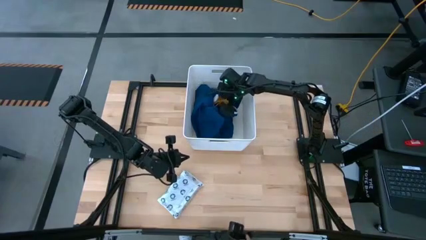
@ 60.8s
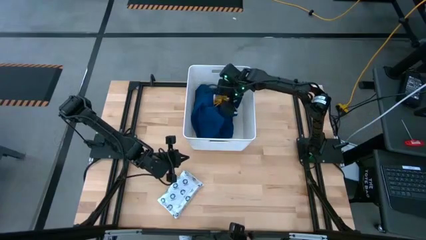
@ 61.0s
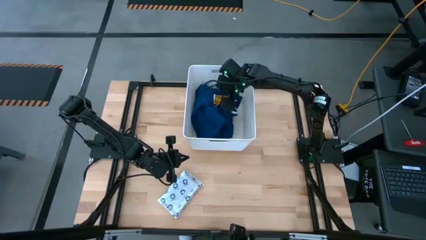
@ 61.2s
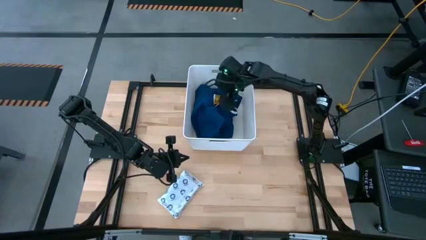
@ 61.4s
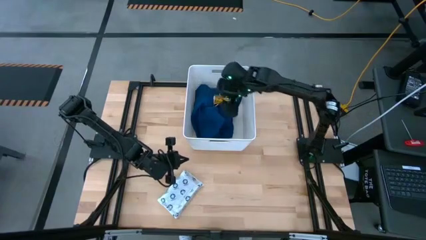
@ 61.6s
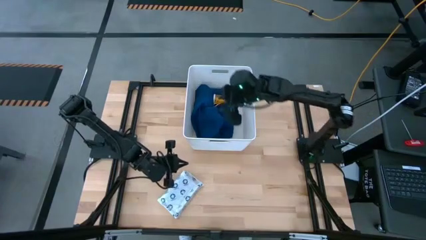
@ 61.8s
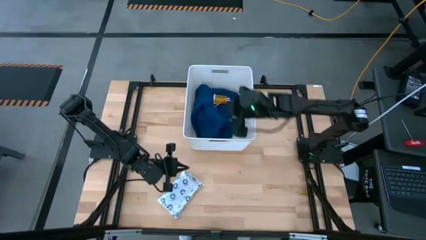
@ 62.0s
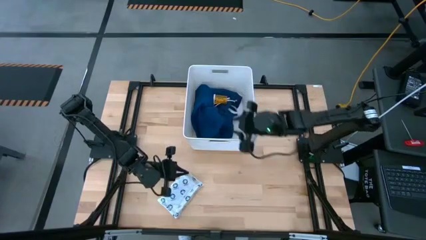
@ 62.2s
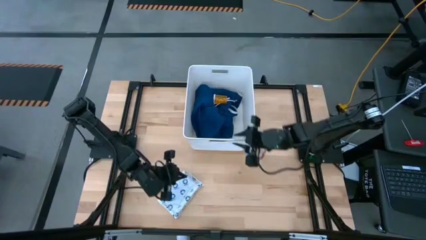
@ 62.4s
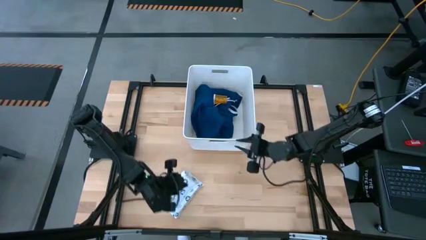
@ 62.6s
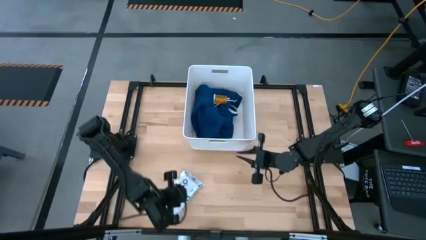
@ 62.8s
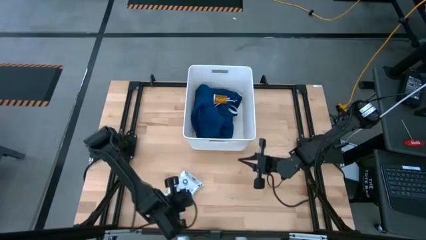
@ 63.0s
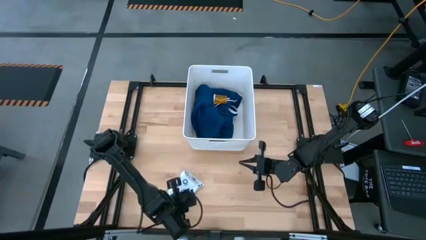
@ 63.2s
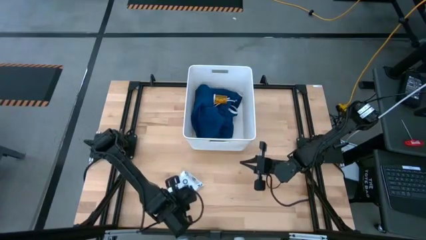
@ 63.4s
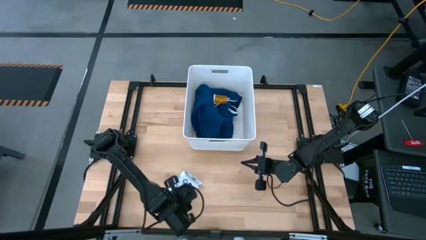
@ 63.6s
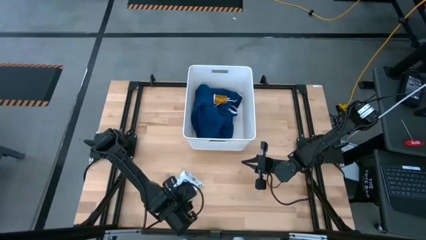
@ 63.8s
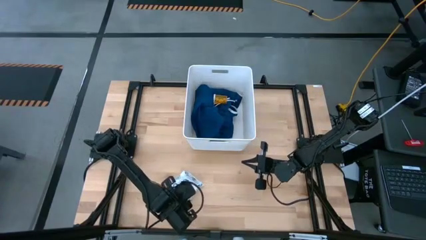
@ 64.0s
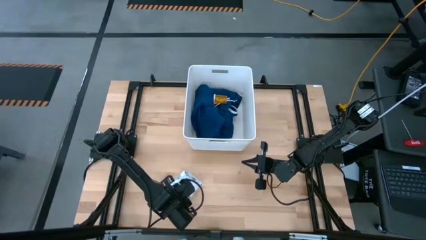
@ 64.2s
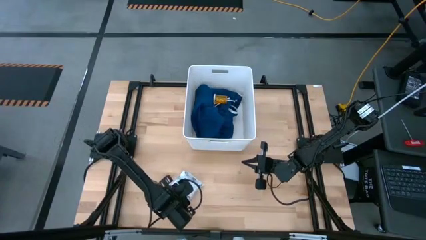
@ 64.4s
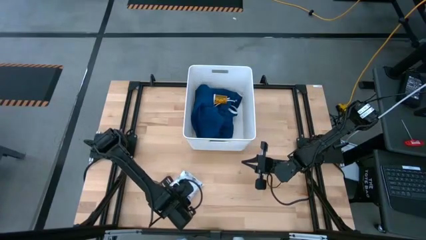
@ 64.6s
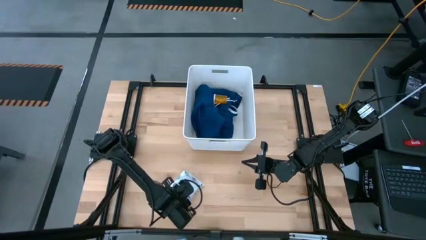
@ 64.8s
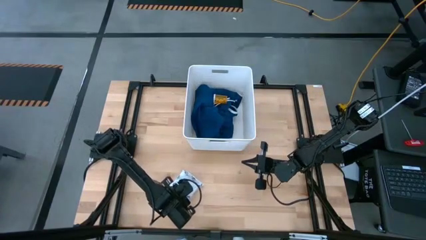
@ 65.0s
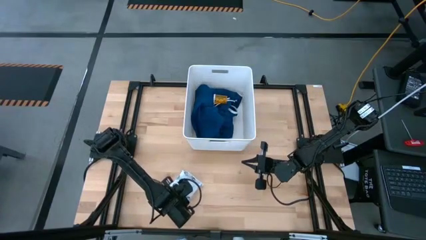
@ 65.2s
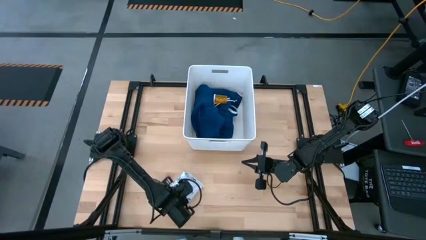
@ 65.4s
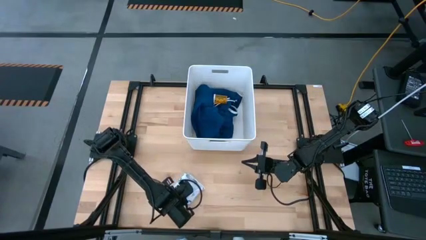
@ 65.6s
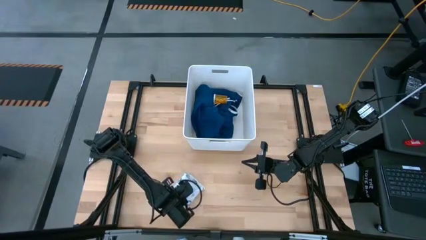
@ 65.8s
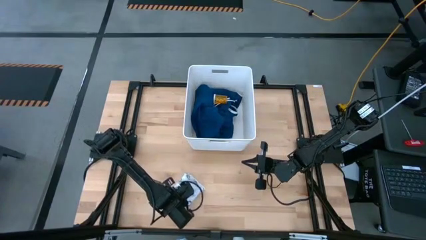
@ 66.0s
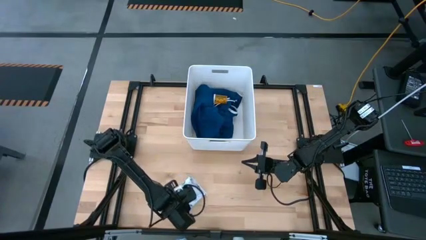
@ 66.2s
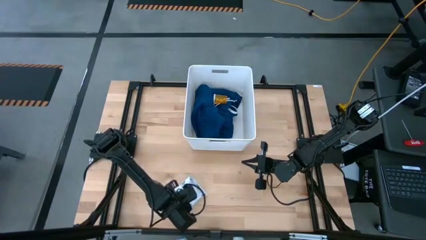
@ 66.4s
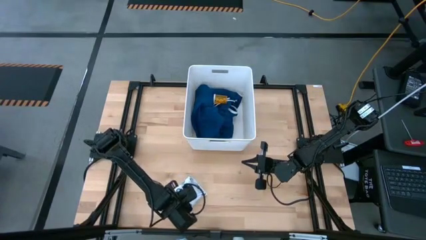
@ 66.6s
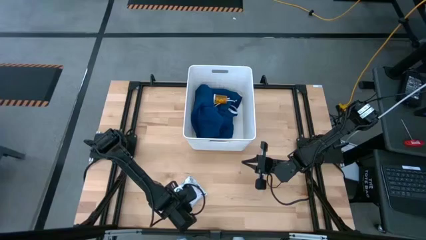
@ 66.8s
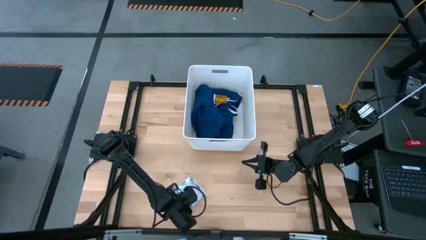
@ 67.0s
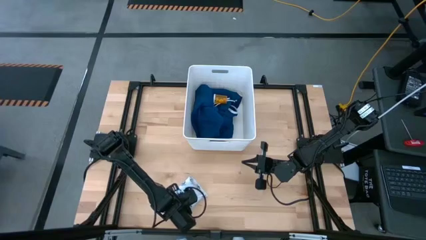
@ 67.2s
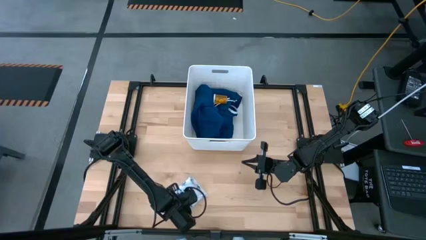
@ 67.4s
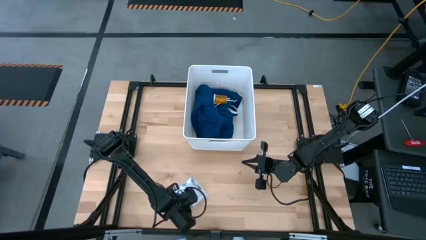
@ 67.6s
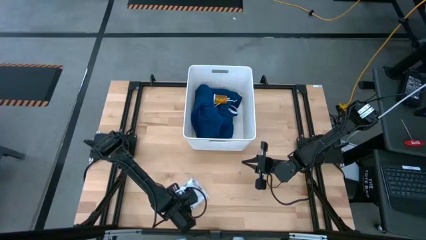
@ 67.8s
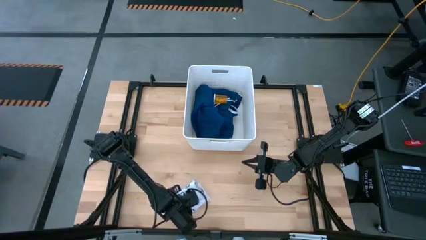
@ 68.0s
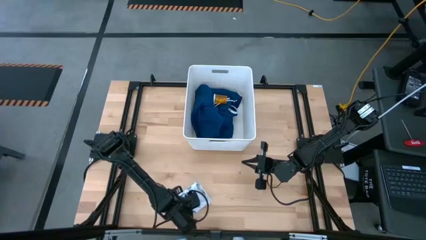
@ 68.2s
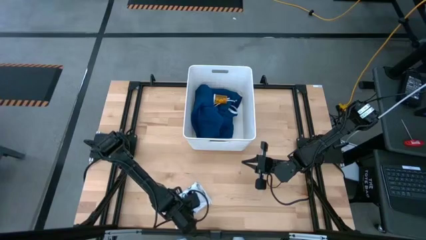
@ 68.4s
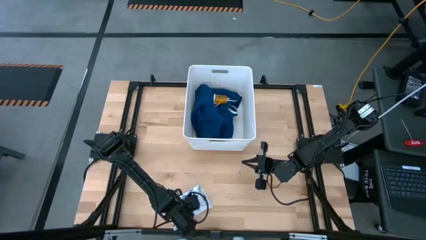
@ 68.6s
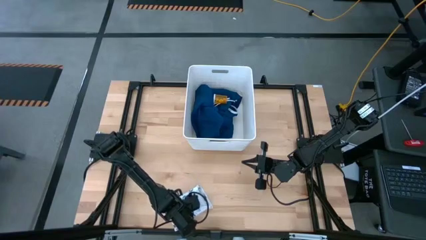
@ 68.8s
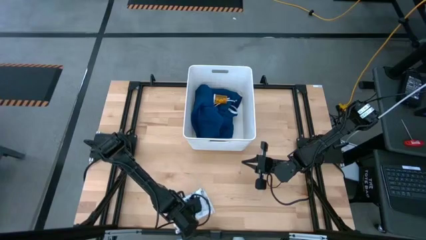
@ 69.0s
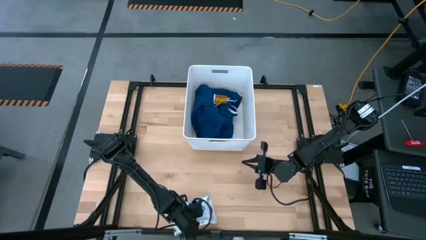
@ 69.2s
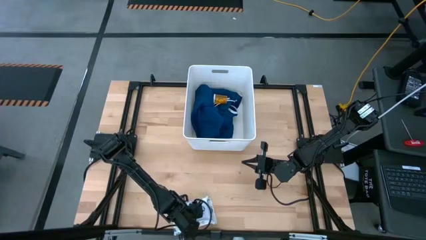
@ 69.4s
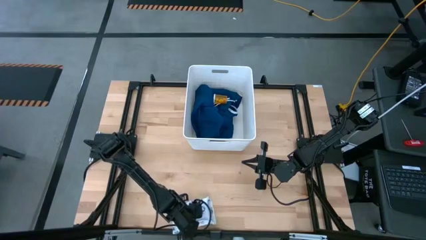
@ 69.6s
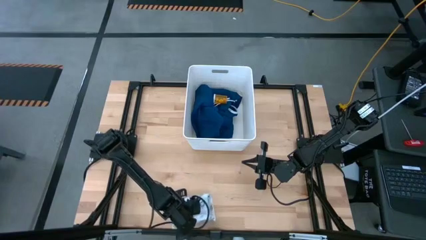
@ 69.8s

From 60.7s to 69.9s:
Task: Pick & place medical supplies in basket/bin
Put the white mailer bag into the white bin

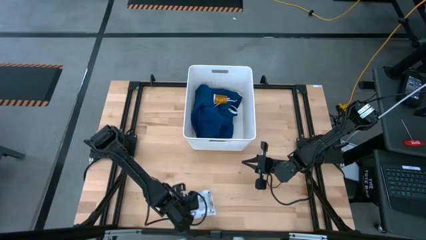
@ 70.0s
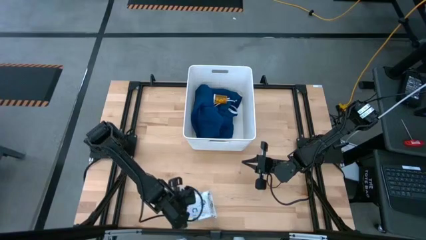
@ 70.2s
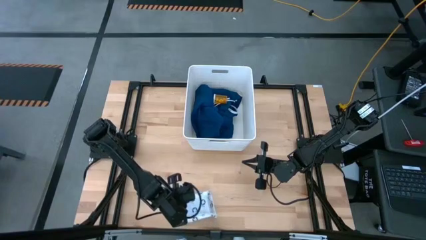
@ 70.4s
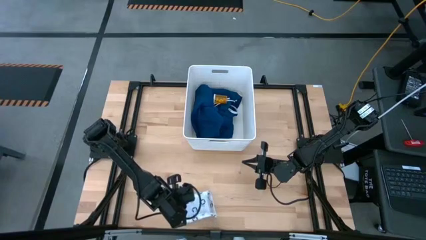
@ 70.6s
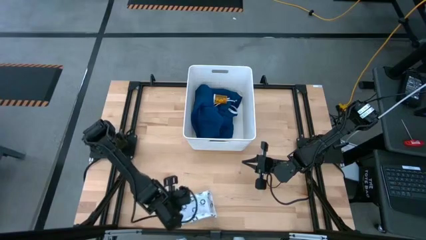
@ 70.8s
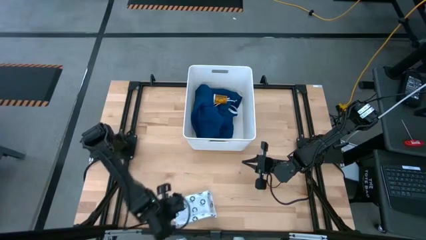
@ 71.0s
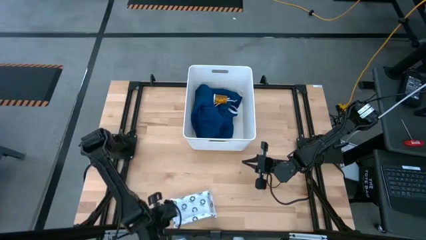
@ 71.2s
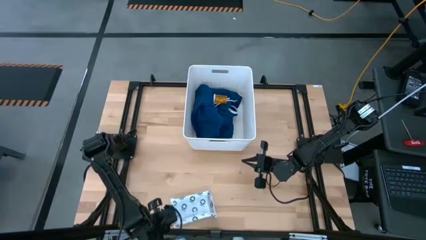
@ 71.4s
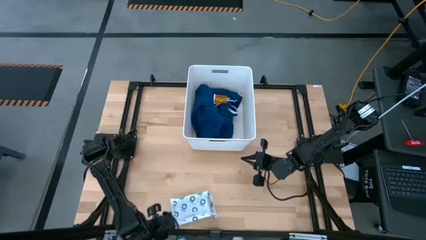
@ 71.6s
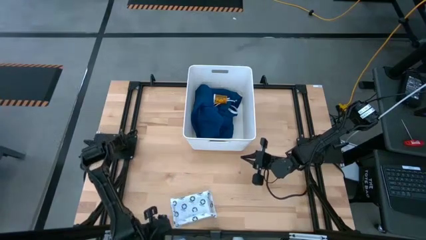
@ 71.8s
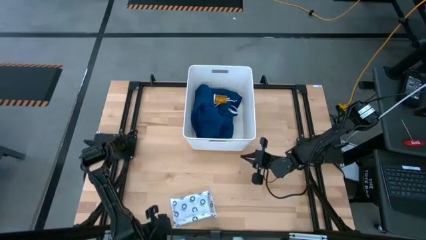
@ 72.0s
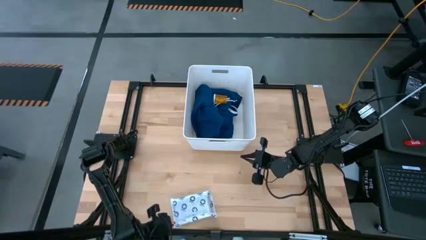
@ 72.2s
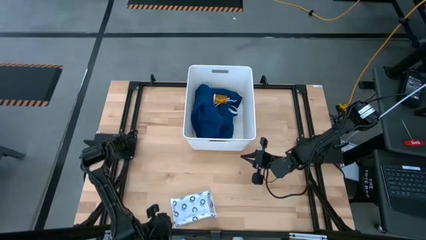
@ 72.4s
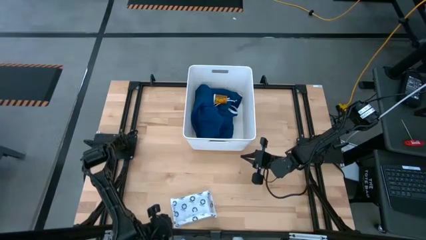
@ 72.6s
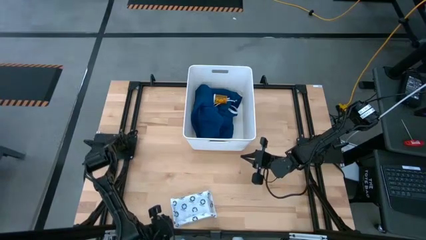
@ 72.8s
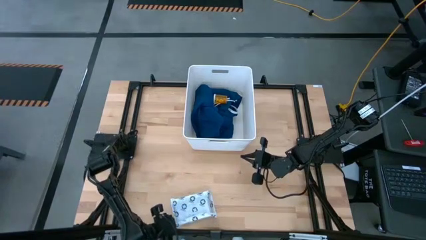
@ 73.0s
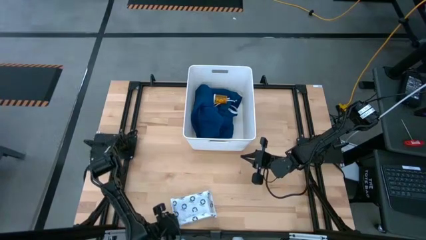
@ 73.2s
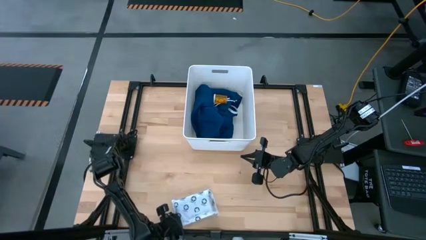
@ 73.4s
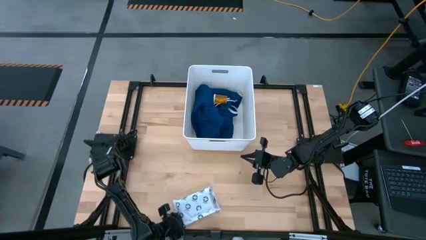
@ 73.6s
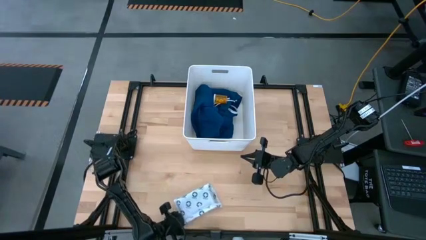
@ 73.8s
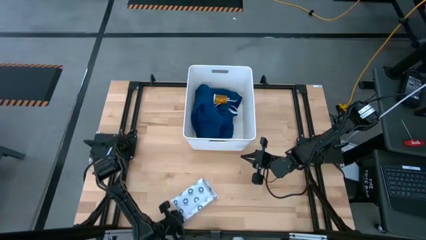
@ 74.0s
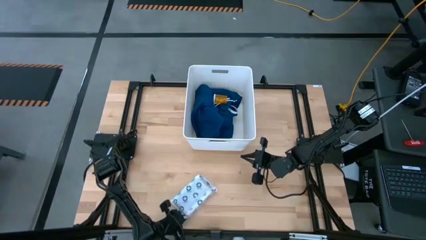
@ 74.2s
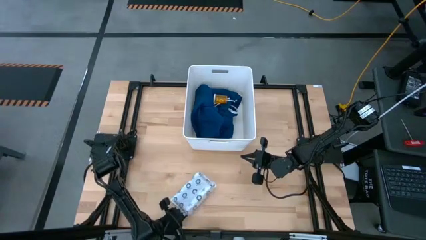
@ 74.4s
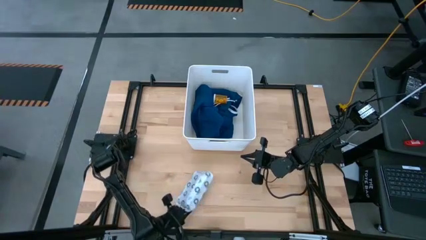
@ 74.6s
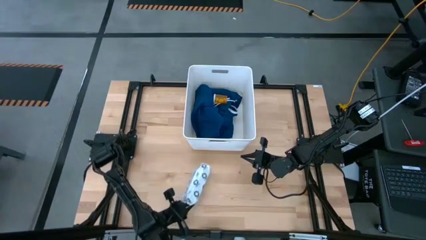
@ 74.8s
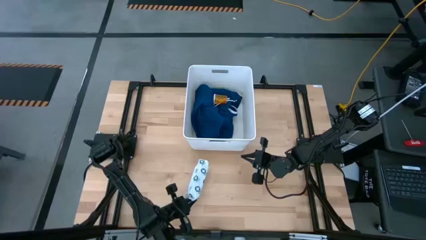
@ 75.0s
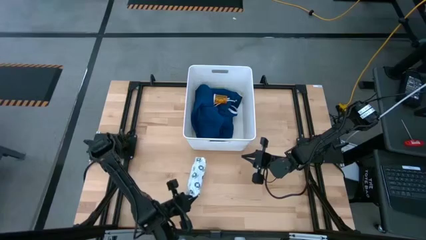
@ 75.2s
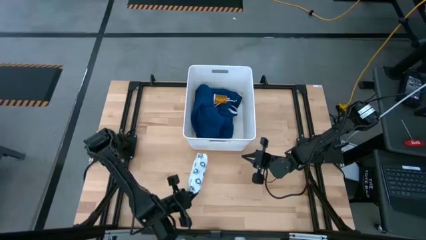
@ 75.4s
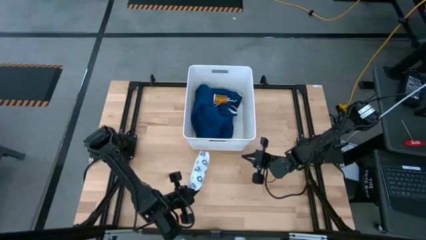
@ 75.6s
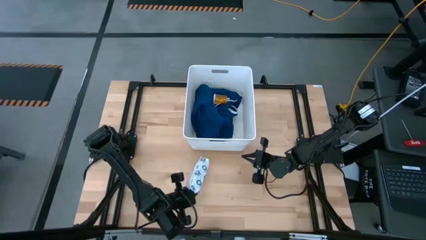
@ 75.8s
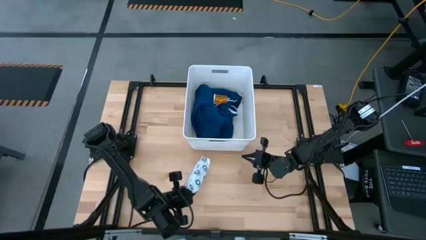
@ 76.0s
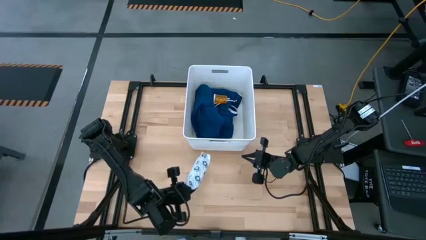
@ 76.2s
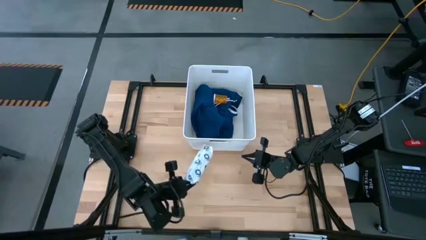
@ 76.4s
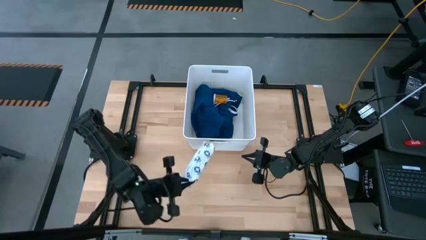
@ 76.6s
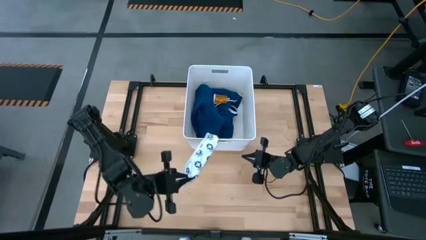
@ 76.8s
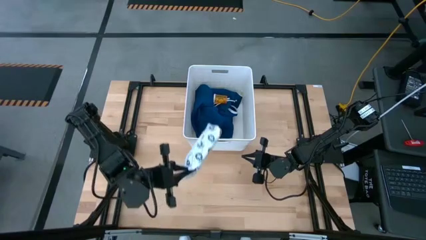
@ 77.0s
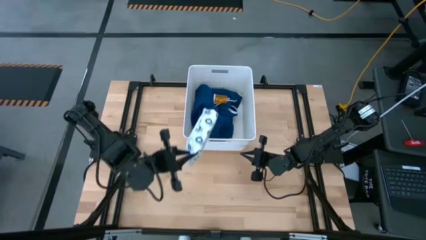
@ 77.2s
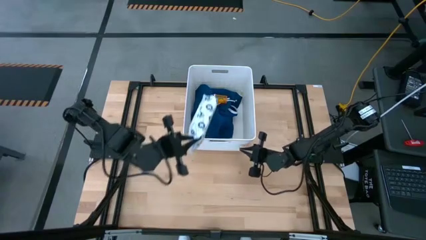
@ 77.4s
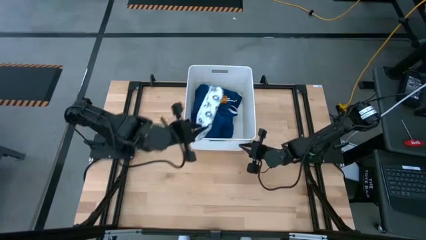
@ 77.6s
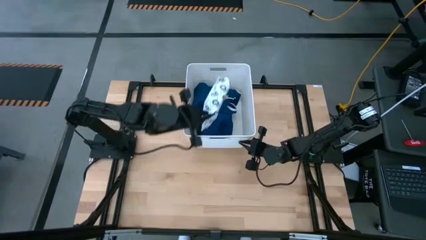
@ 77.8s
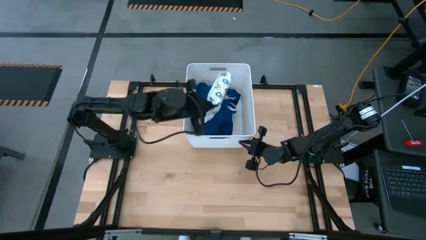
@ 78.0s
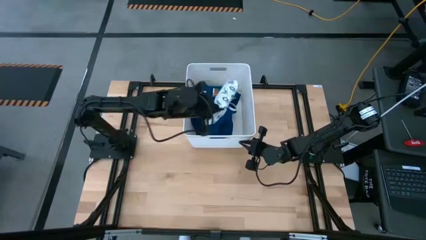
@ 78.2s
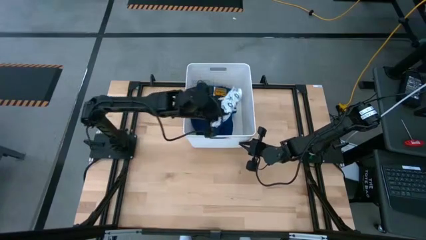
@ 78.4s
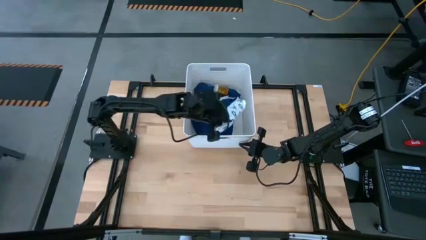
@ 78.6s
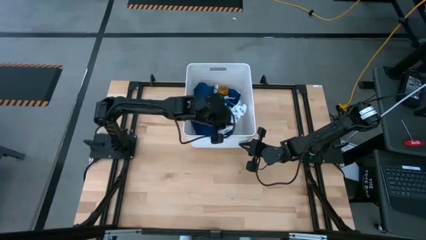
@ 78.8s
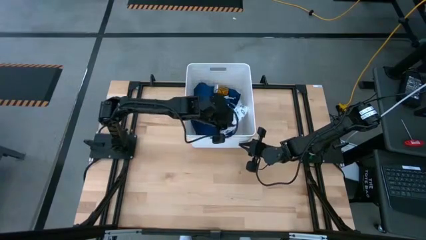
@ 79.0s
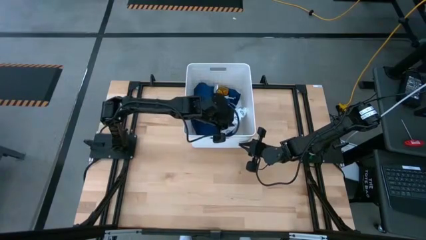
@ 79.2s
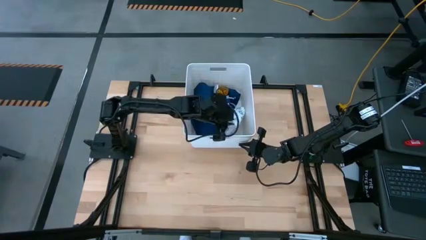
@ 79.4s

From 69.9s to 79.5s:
Put the white mailer bag into the white bin
